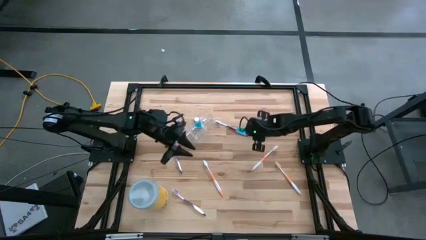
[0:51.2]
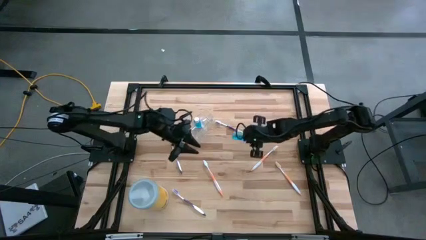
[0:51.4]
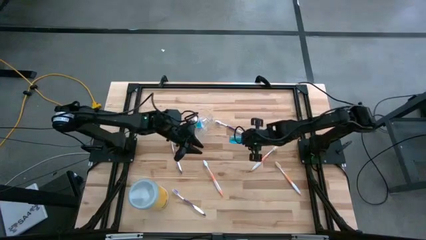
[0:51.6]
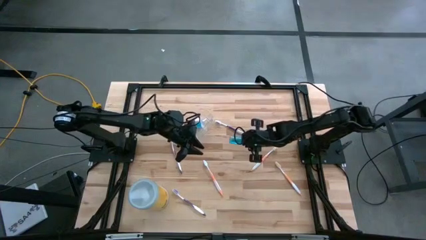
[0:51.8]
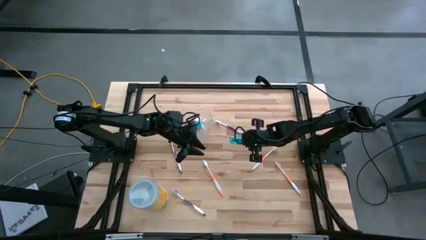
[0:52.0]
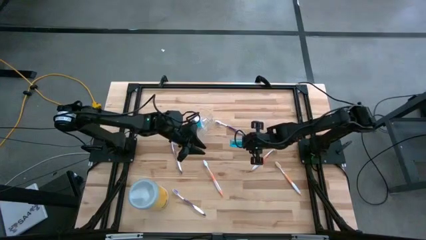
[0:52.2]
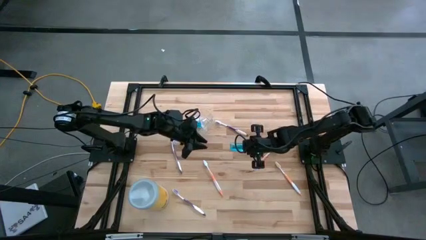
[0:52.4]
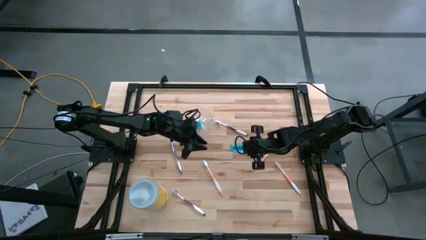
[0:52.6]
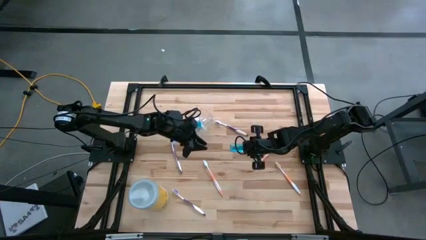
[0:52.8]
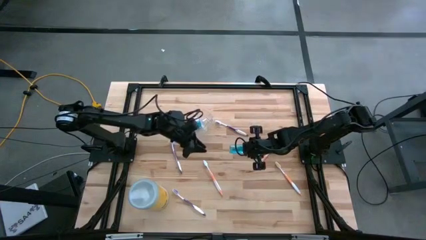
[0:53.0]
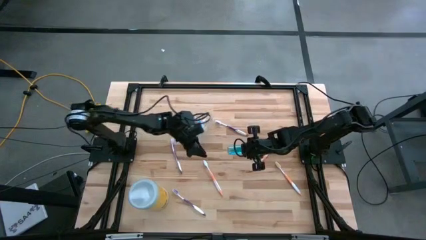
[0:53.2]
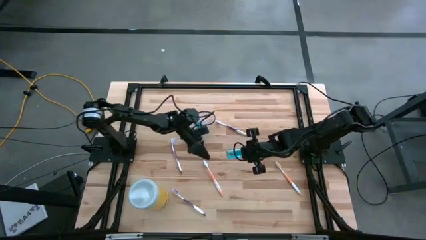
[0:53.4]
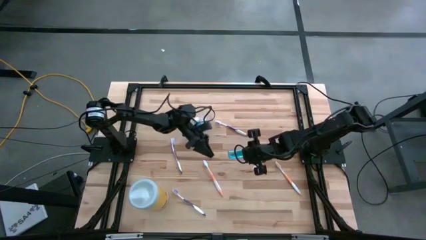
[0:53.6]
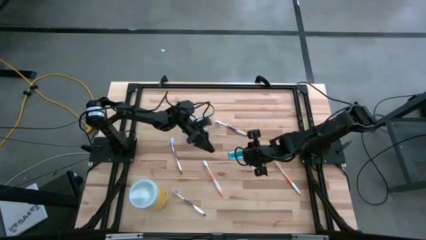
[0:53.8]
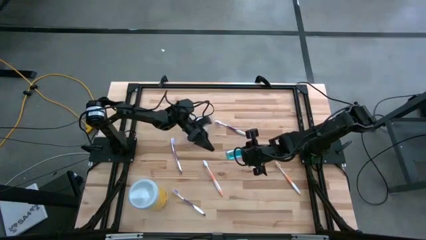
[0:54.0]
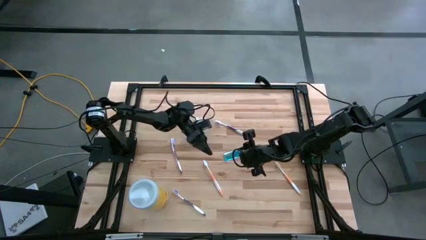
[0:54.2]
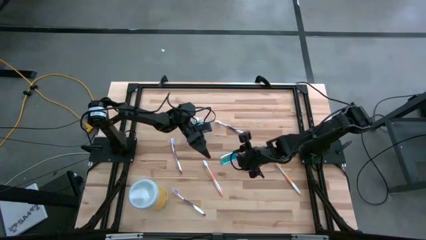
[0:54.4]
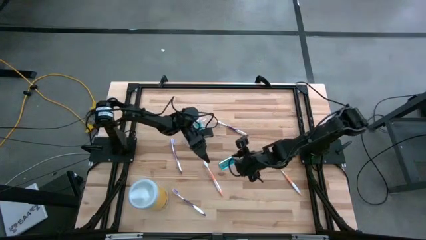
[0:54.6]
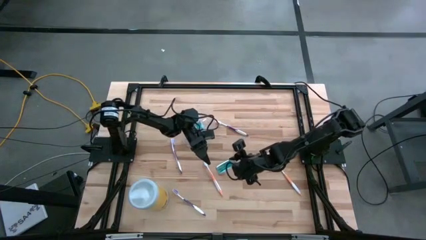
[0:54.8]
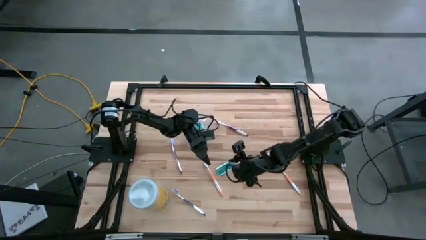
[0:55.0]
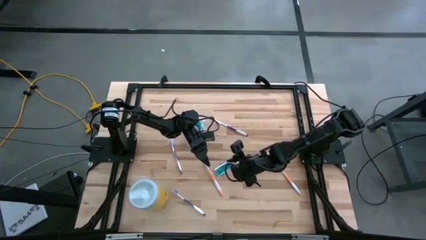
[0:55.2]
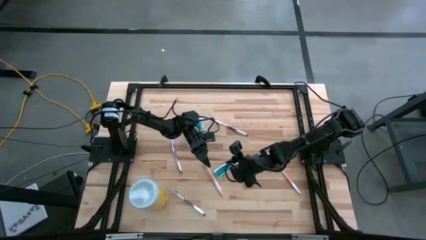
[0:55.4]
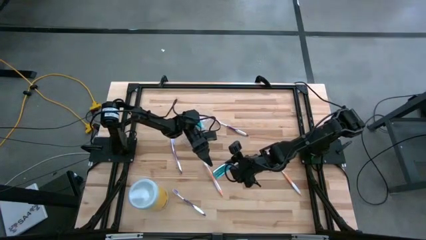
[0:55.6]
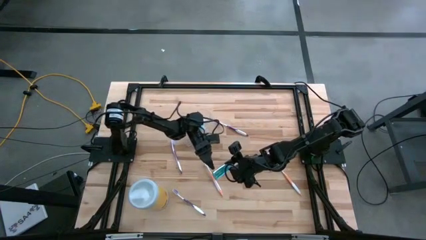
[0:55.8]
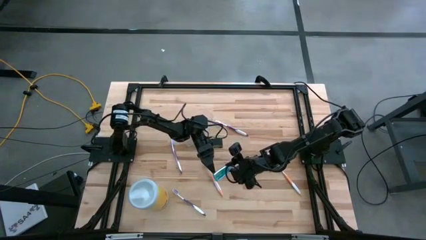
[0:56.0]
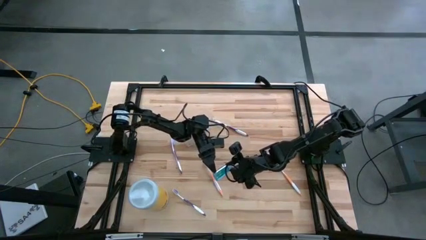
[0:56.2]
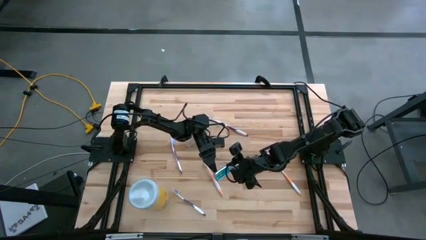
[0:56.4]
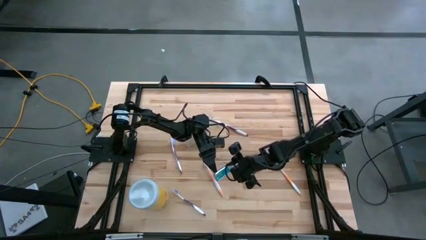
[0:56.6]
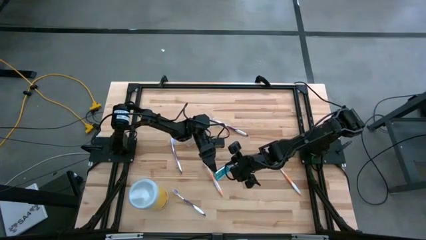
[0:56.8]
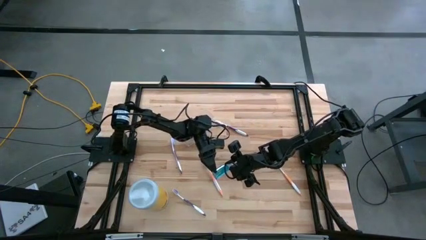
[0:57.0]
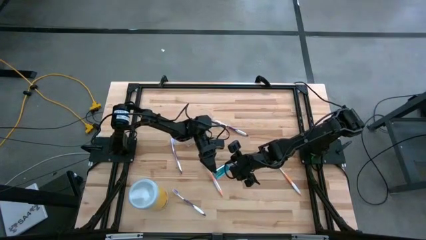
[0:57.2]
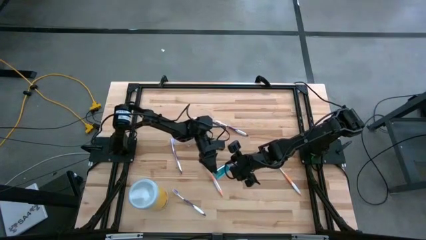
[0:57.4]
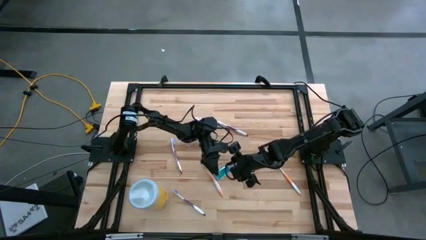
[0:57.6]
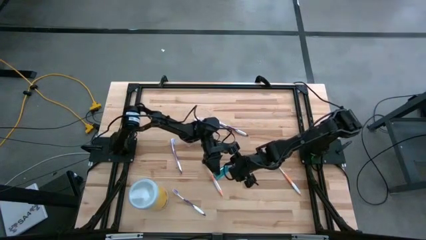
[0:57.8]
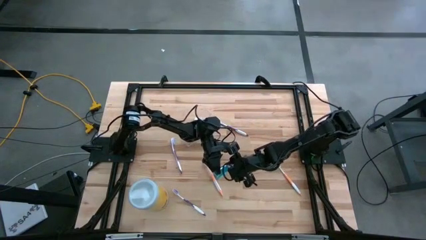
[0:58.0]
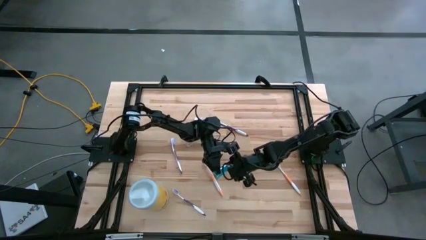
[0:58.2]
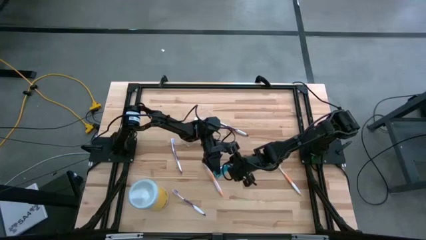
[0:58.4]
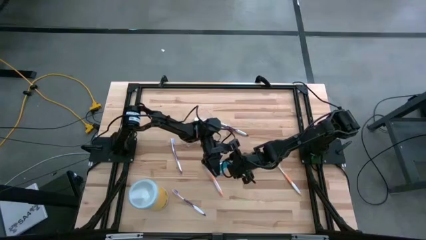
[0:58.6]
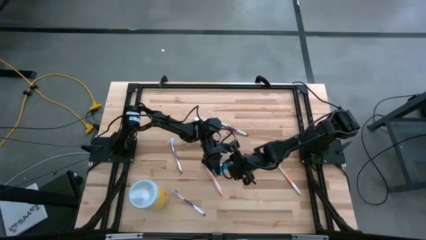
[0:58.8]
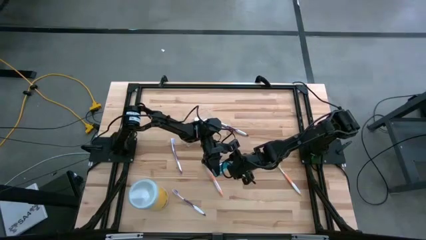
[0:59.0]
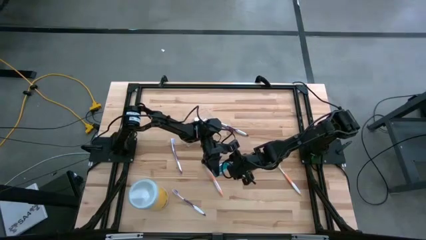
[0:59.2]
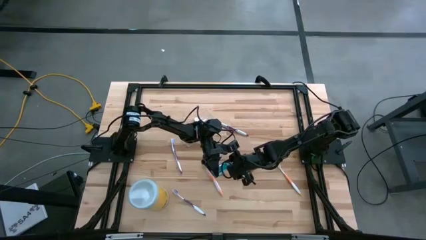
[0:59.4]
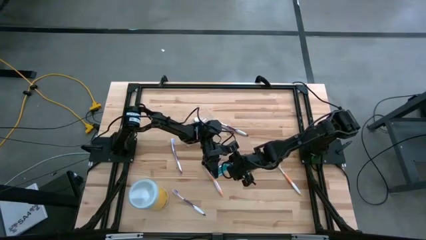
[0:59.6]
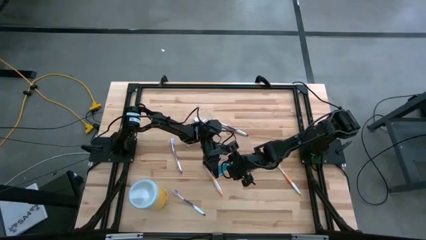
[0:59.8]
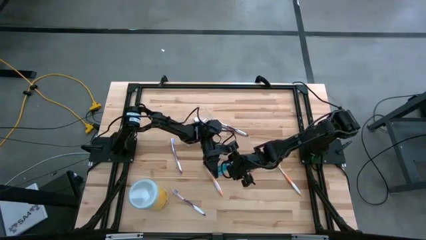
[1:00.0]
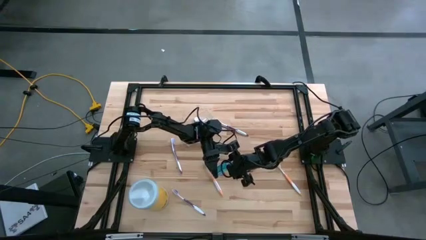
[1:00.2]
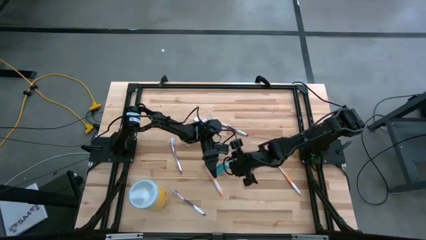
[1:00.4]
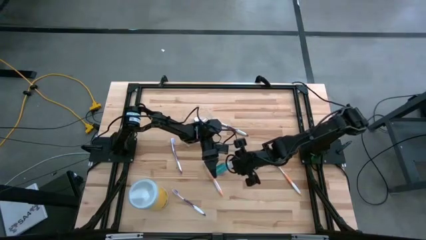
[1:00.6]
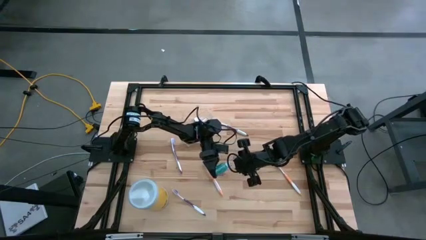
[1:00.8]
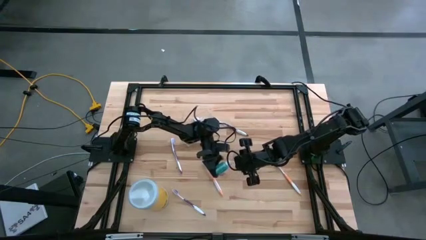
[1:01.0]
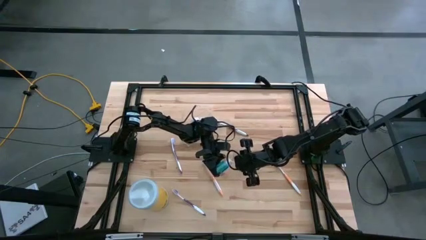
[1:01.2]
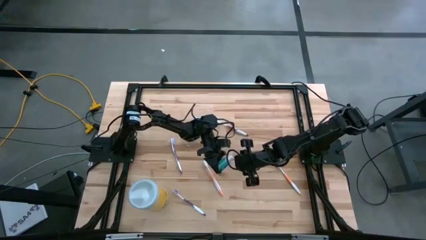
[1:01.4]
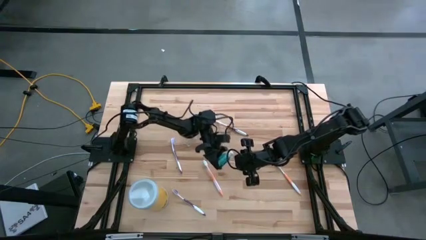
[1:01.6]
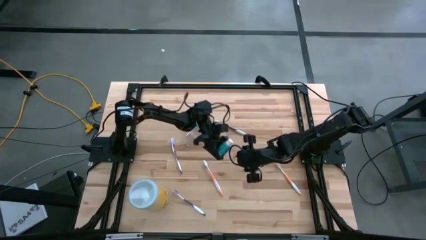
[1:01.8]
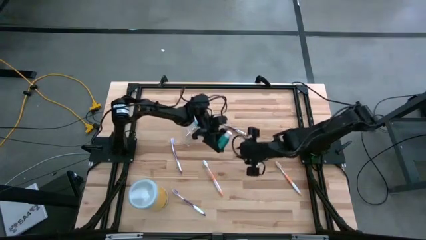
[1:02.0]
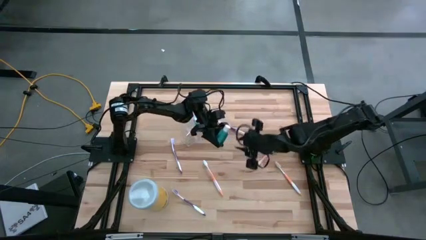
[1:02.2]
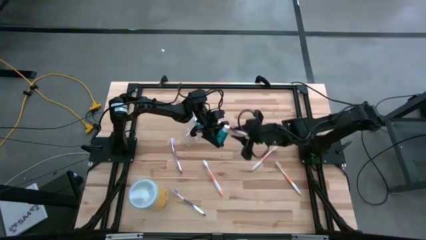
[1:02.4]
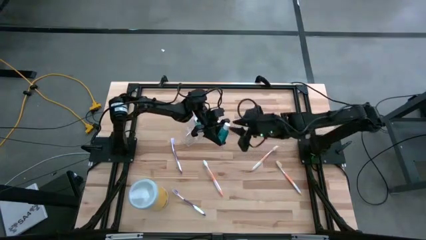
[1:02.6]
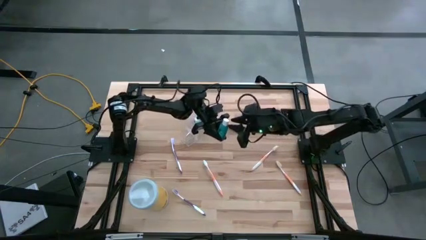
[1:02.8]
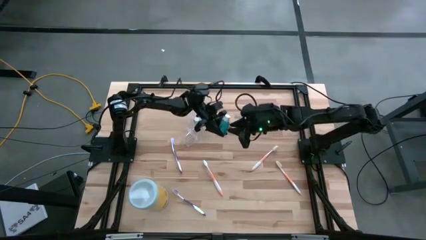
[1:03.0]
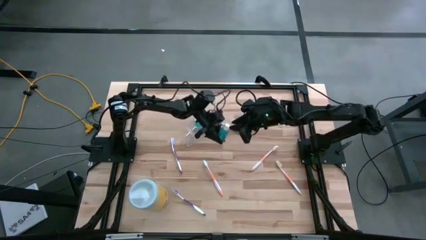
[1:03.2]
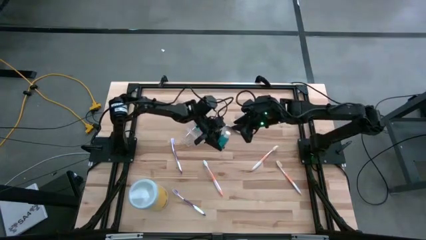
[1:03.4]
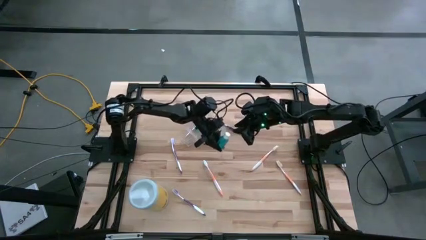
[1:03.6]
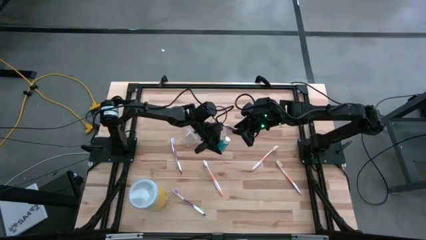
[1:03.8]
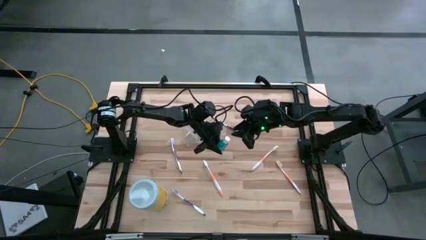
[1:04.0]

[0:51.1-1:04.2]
Task: Pick & Place toothbrushing station
Put the blue mouthwash into the transparent organizer
